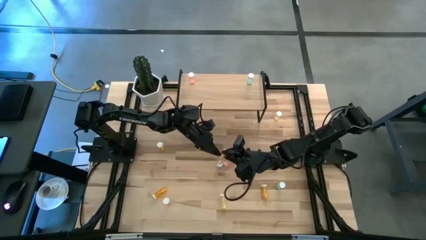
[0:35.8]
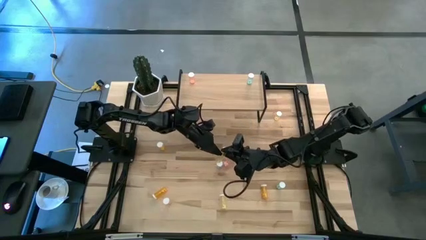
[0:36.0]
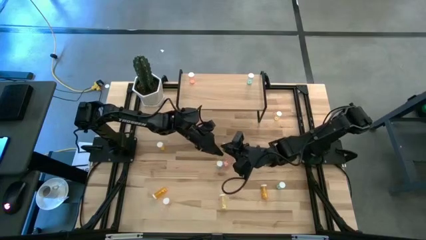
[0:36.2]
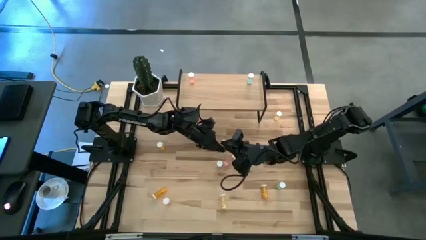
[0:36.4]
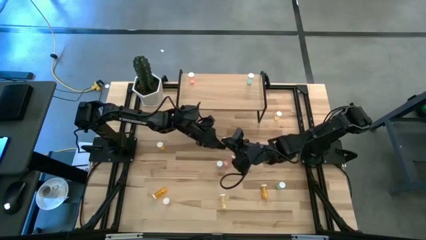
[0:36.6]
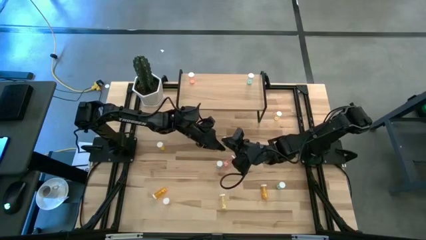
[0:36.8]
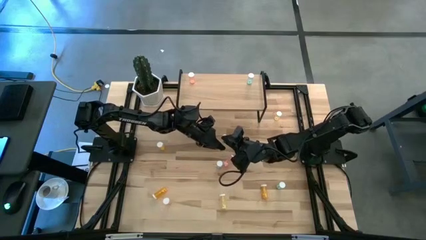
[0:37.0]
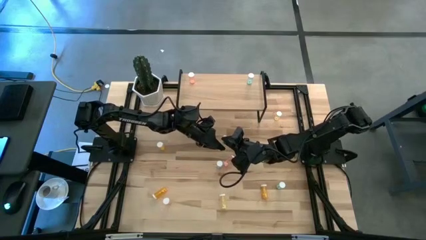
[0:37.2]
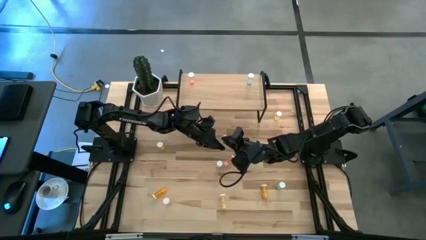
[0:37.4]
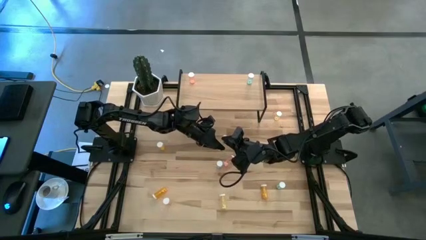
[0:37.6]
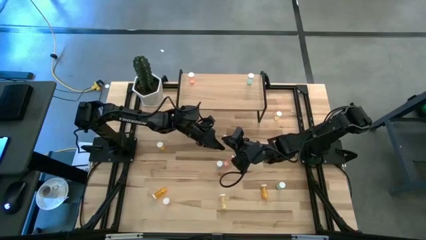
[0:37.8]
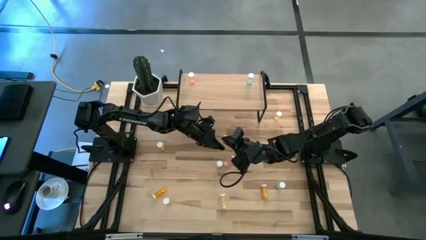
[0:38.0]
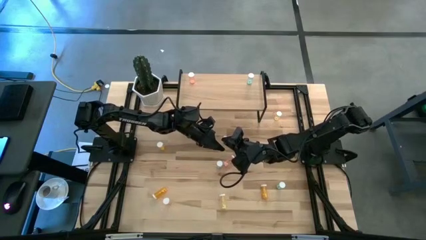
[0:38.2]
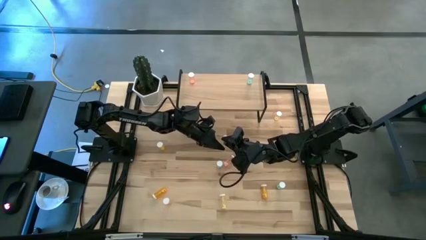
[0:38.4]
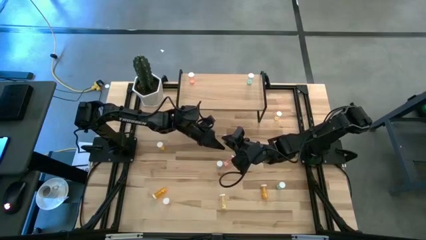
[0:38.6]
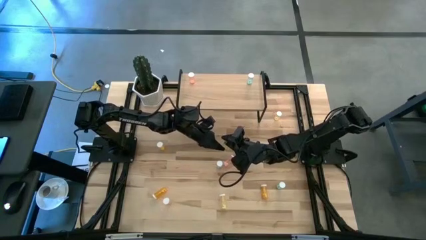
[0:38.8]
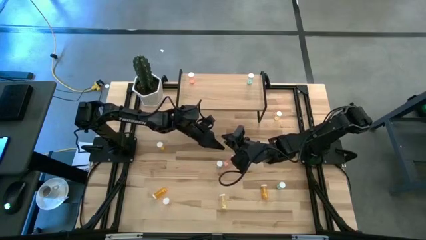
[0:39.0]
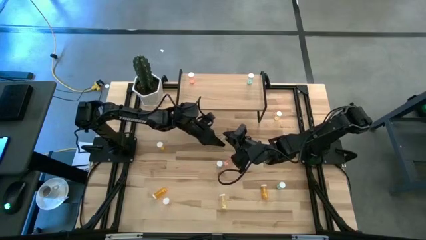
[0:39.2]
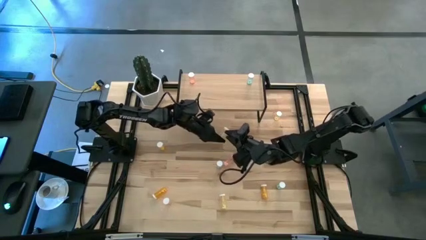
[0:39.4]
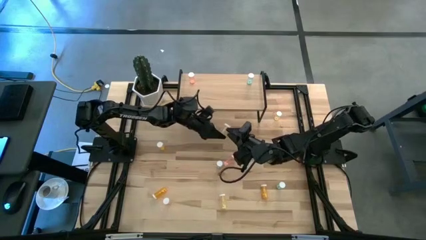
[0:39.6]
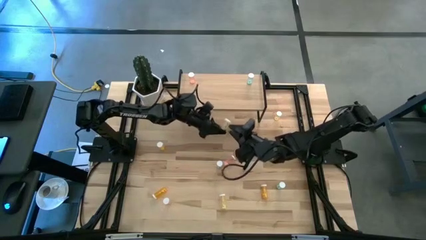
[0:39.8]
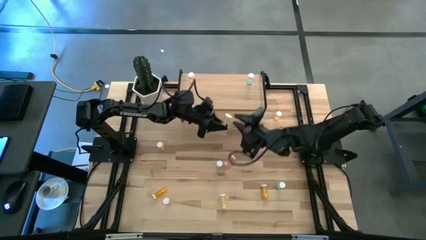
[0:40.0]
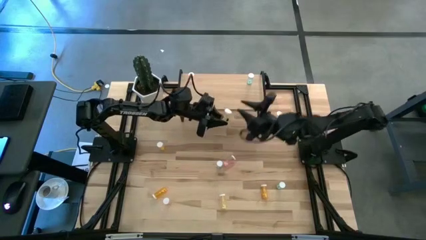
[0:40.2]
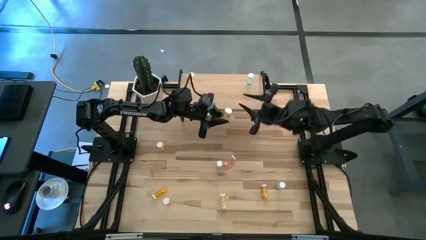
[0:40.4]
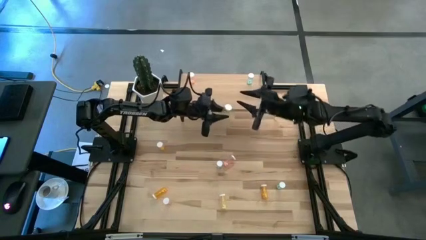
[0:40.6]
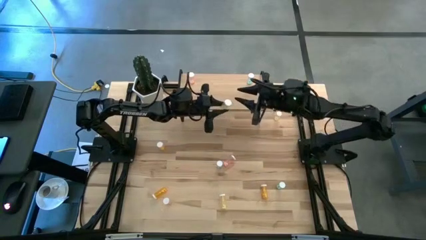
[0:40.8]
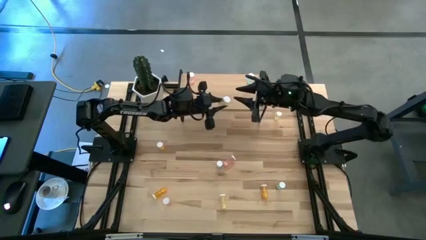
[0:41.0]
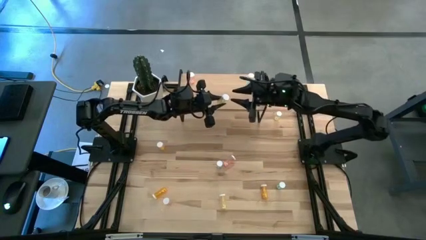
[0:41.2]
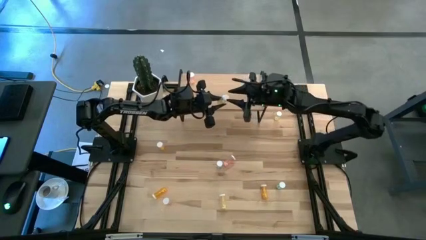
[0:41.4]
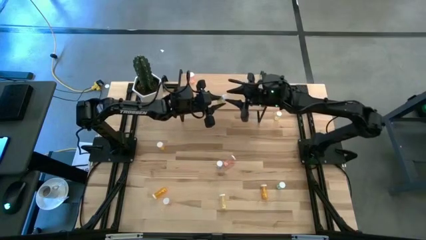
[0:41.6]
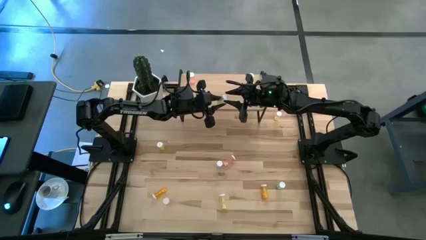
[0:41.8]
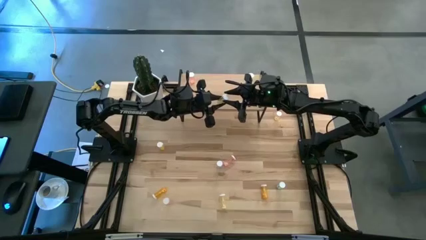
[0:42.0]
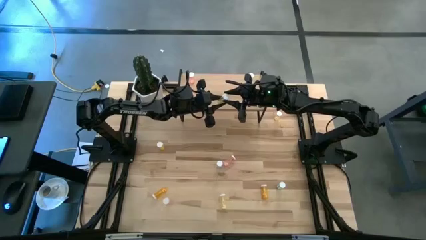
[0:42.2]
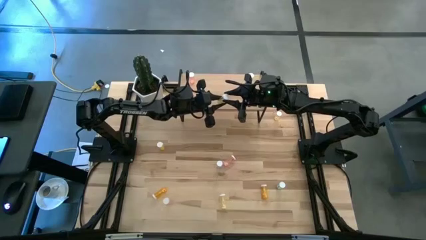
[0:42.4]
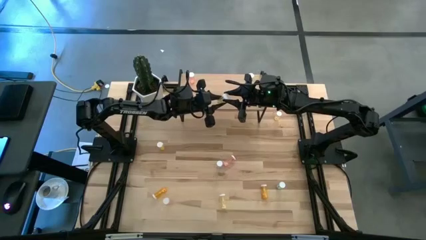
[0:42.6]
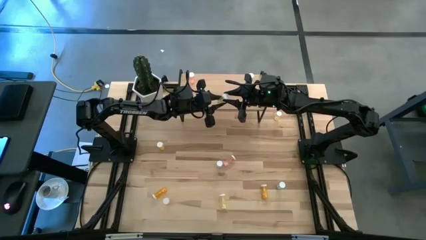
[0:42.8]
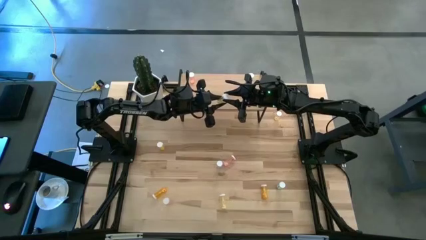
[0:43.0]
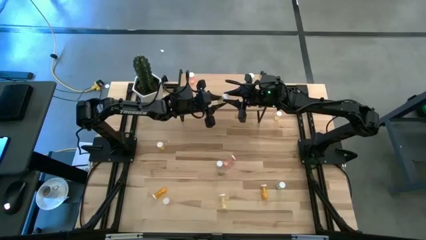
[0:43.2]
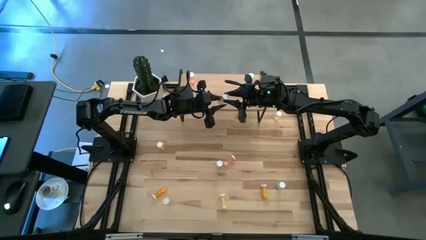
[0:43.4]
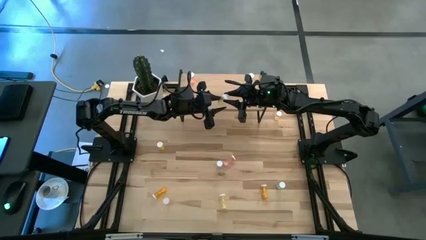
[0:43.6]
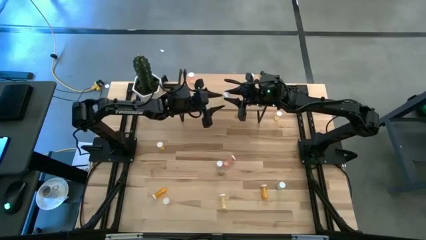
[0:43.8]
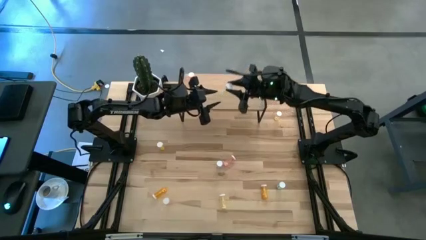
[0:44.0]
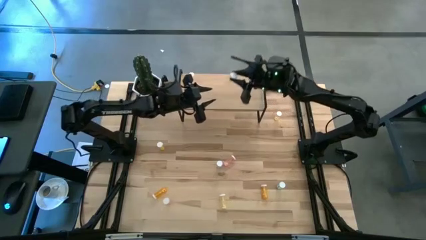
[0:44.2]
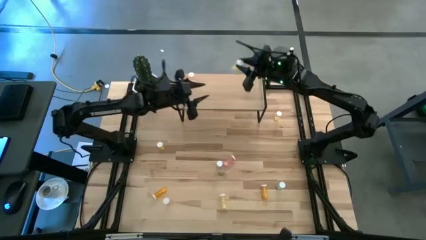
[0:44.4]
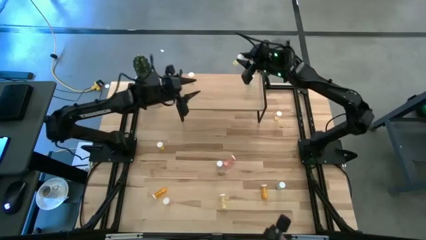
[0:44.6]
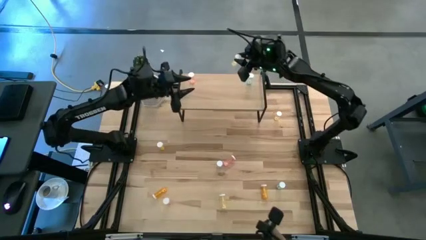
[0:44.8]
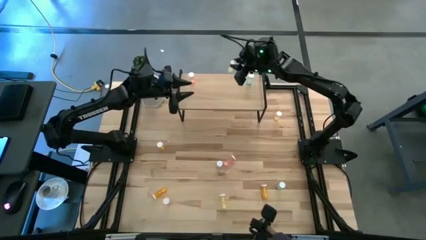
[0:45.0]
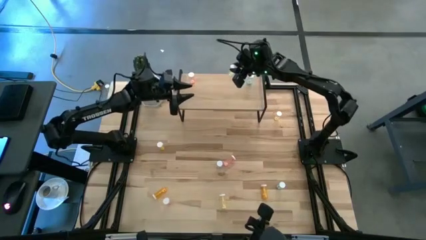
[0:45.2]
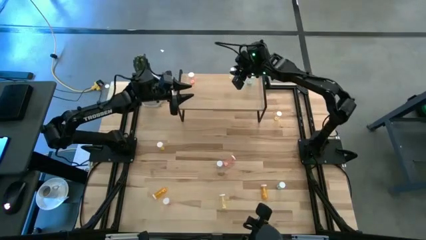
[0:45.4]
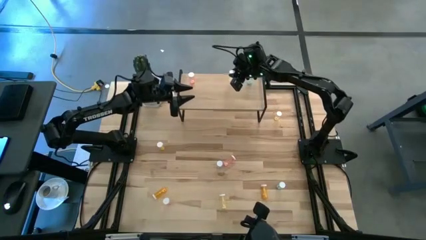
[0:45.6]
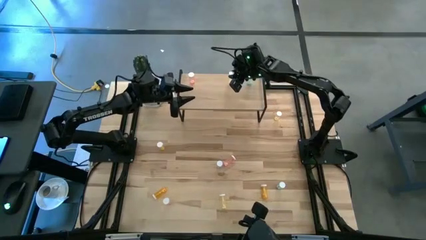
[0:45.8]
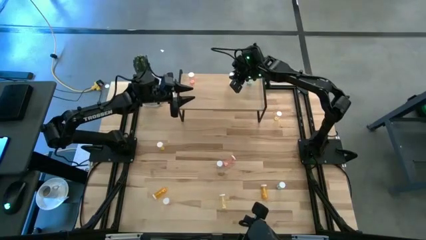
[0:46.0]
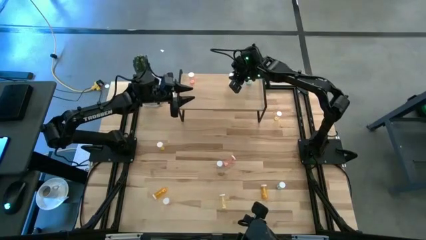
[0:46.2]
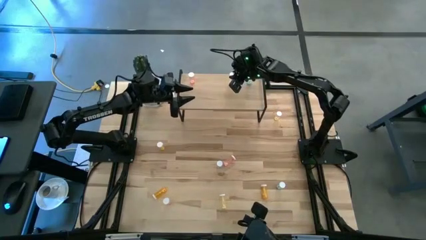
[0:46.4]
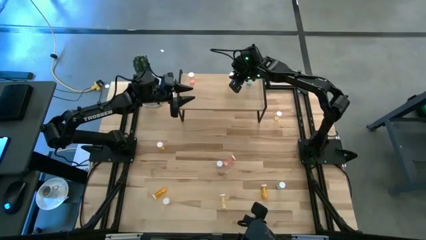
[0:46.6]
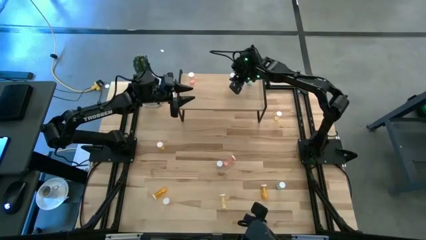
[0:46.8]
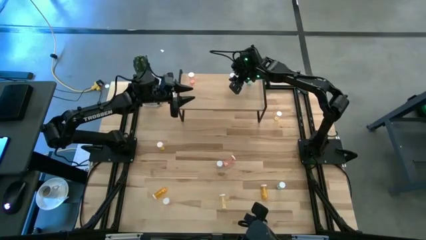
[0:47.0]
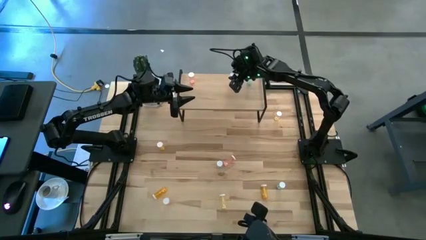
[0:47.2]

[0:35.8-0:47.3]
Task: Pick and place medicine bottles onto shelf by color
Put the middle yellow pill bottle on the shelf

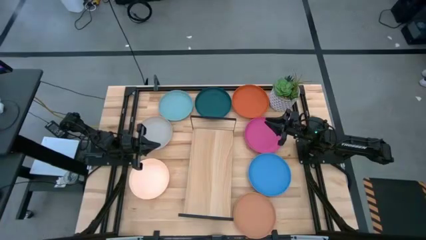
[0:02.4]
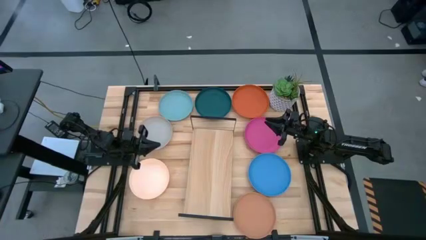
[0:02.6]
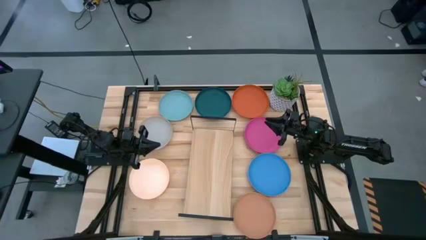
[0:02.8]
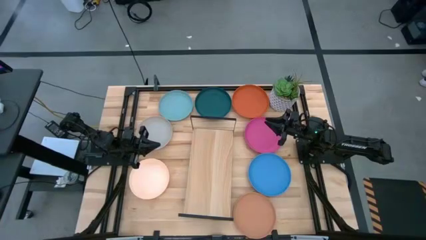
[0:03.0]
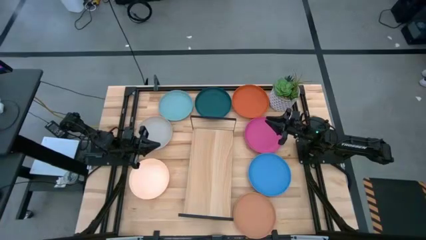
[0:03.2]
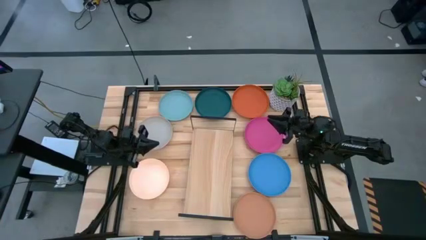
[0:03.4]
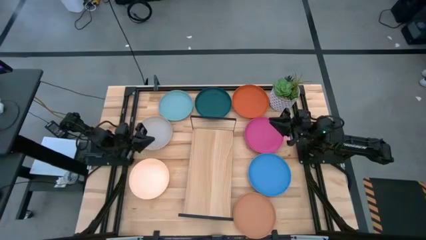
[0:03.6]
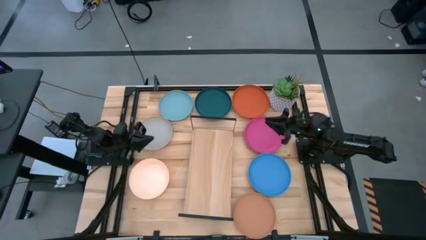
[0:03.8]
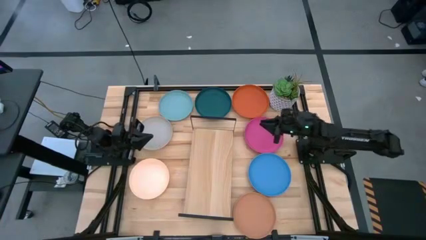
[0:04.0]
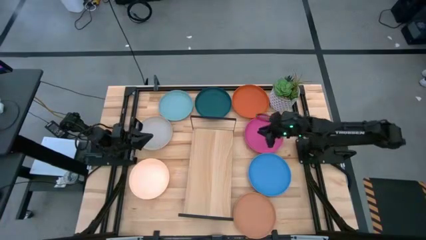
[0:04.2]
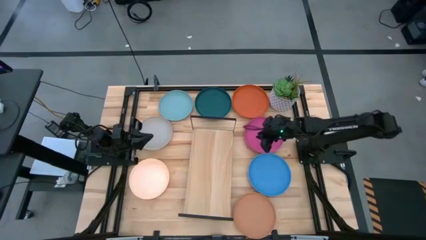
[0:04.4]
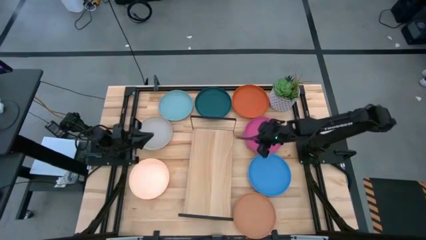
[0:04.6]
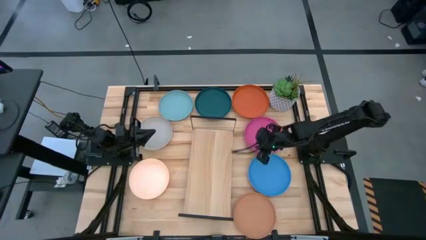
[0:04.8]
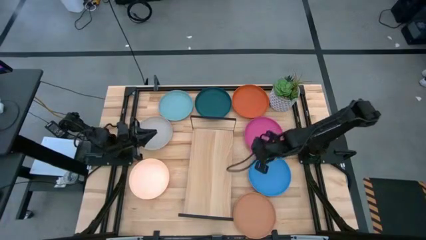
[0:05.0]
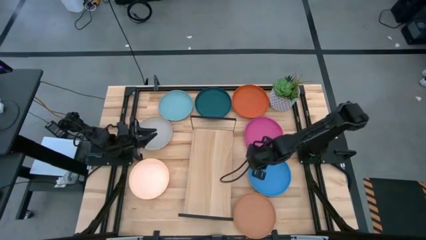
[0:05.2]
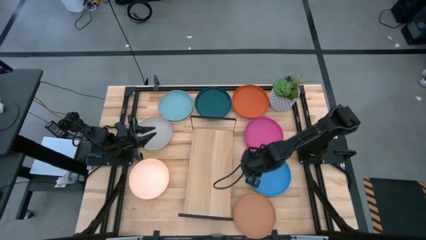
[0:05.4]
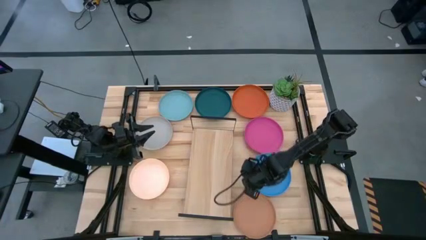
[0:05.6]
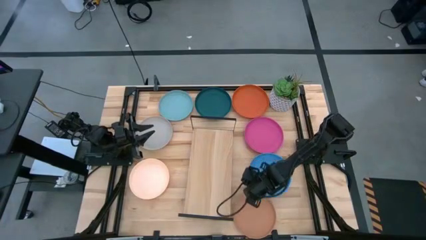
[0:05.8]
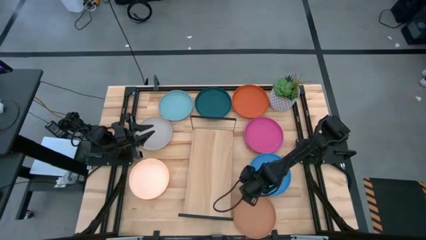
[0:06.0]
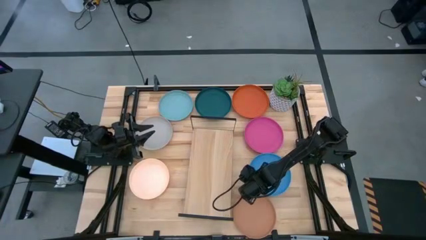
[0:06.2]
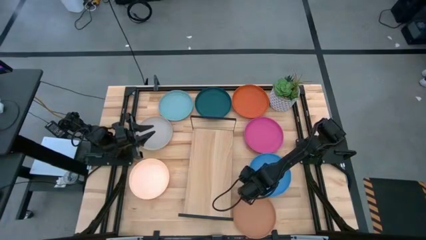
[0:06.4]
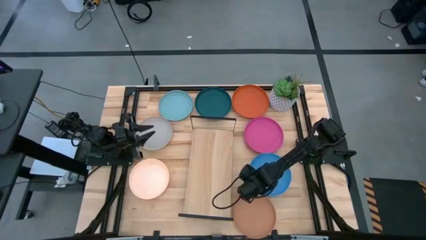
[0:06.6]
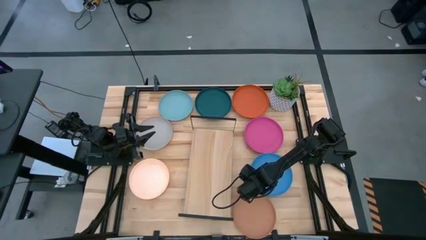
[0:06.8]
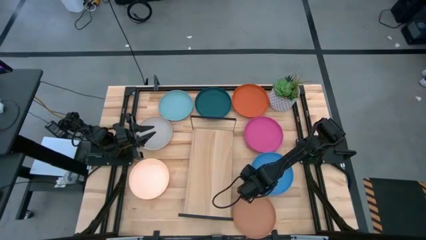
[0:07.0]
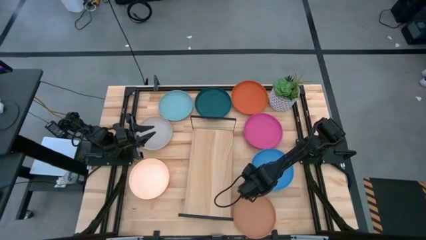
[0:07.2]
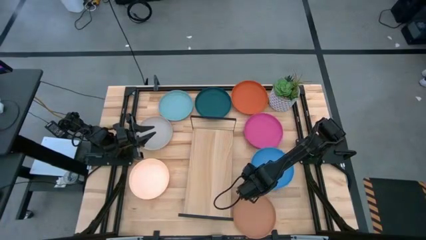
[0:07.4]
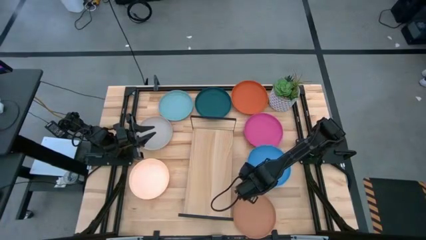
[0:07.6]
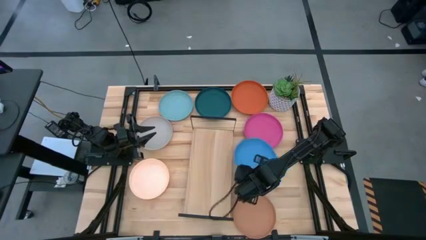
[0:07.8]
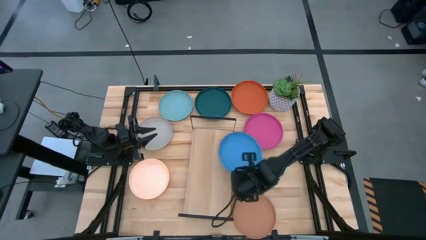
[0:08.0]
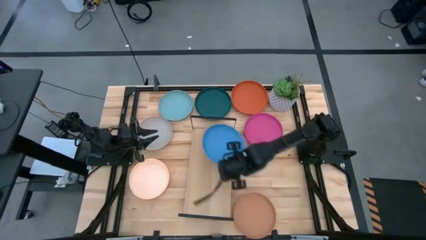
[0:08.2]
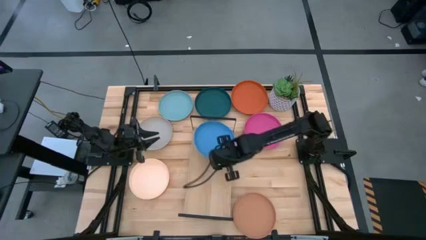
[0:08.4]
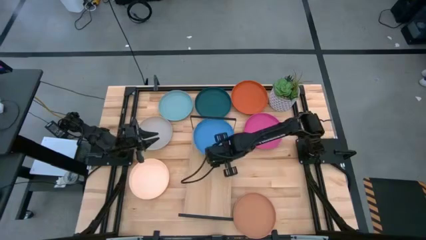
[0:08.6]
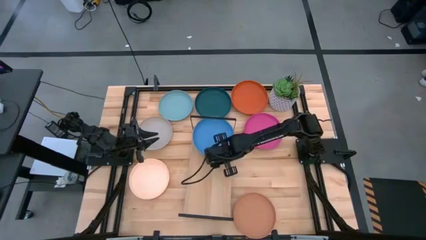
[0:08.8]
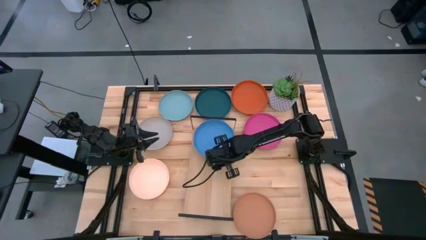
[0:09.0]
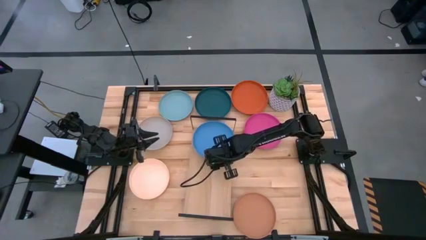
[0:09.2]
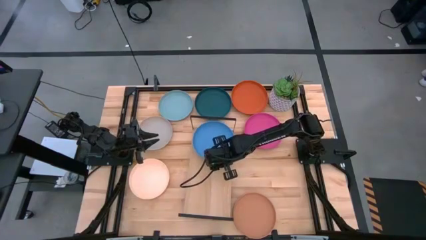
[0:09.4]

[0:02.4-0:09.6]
Task: Place and stack plates onto a shelf
Put the blue plate on the shelf
